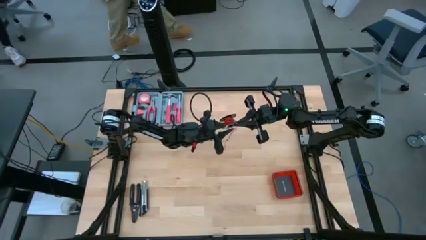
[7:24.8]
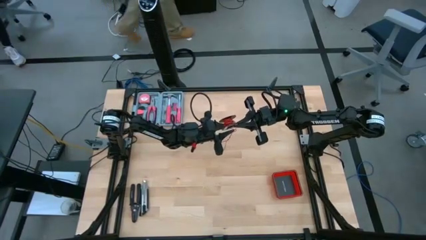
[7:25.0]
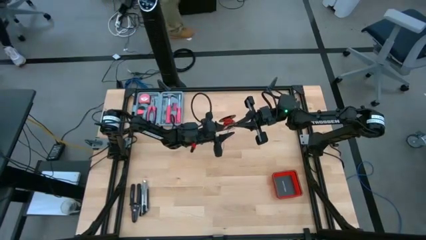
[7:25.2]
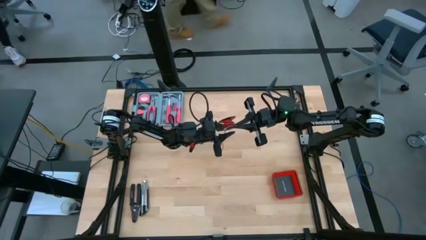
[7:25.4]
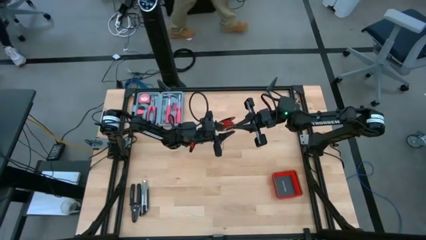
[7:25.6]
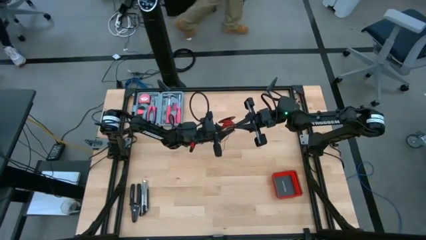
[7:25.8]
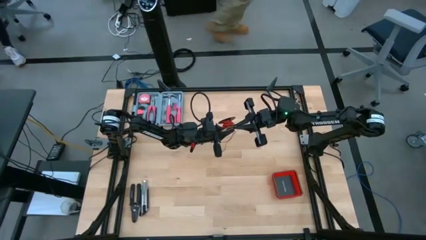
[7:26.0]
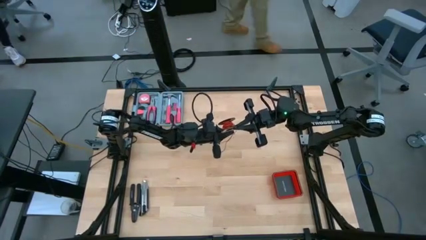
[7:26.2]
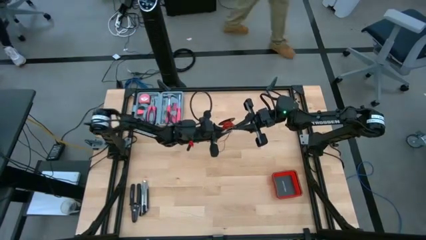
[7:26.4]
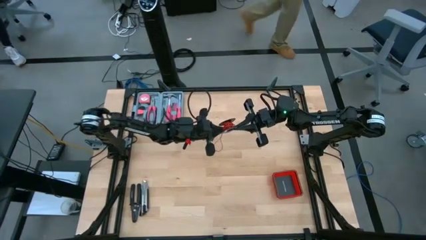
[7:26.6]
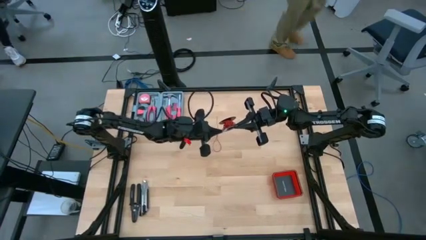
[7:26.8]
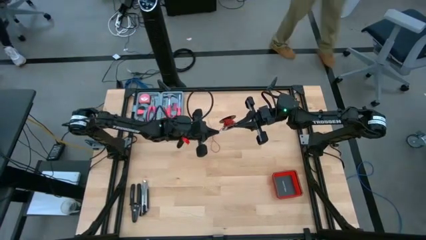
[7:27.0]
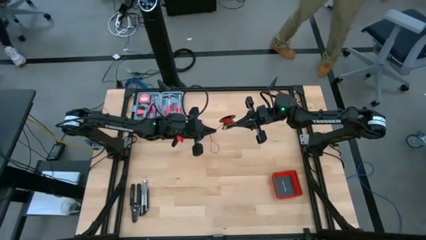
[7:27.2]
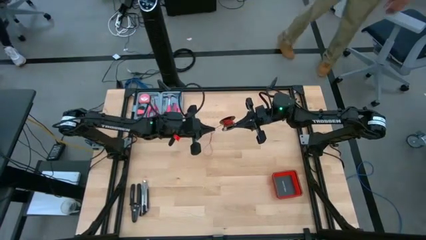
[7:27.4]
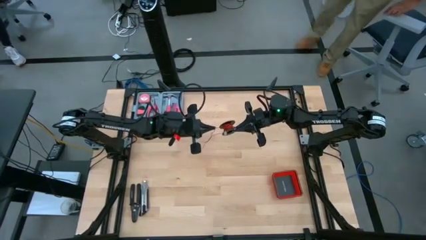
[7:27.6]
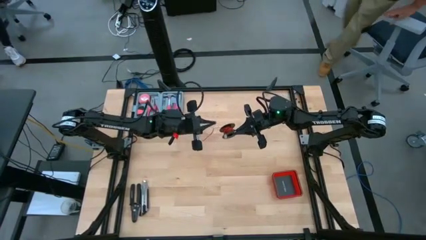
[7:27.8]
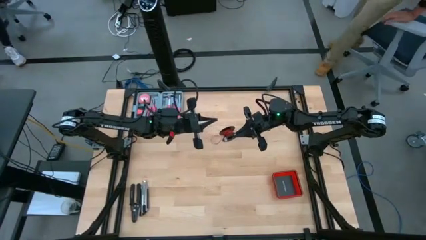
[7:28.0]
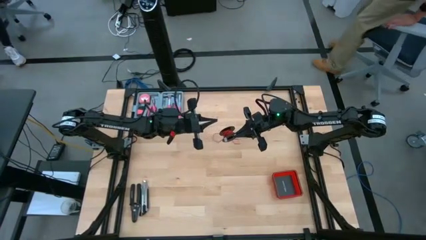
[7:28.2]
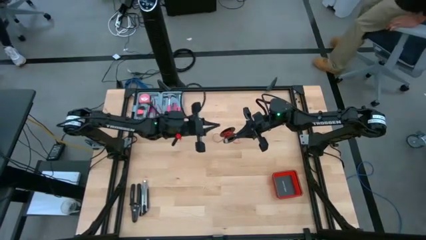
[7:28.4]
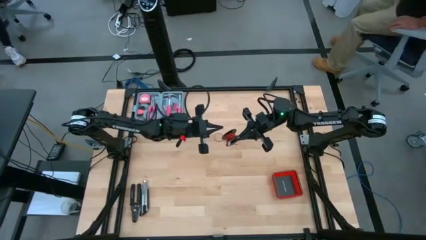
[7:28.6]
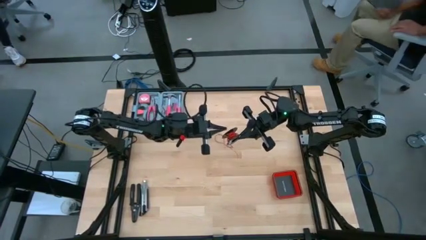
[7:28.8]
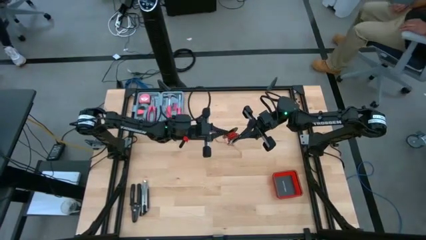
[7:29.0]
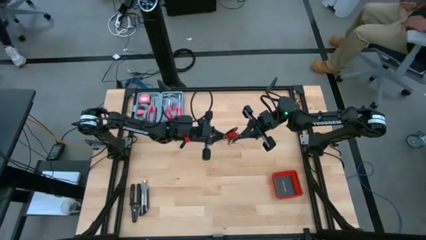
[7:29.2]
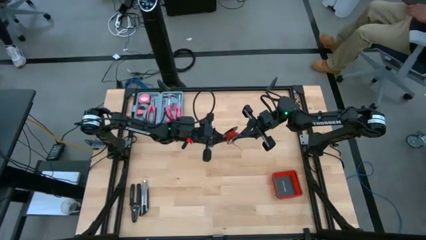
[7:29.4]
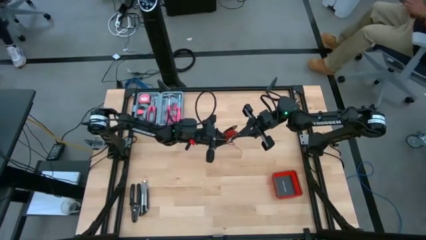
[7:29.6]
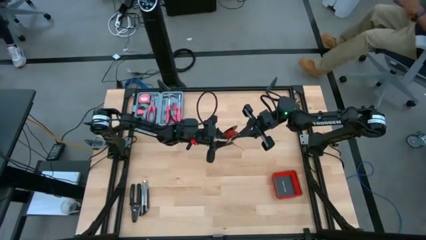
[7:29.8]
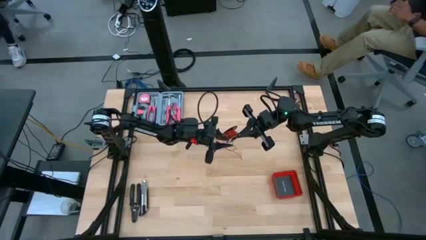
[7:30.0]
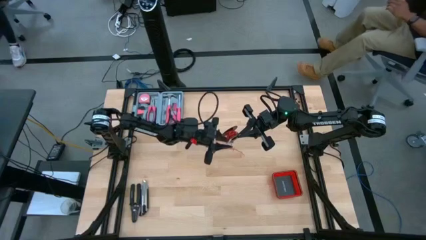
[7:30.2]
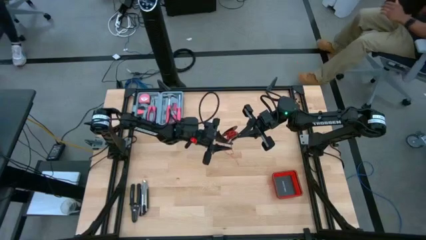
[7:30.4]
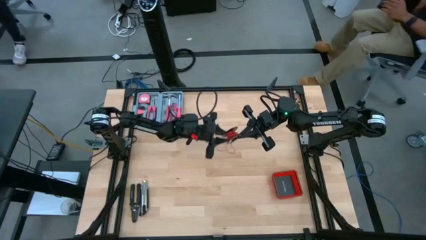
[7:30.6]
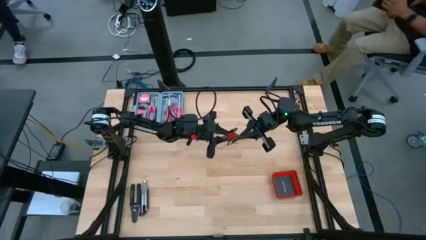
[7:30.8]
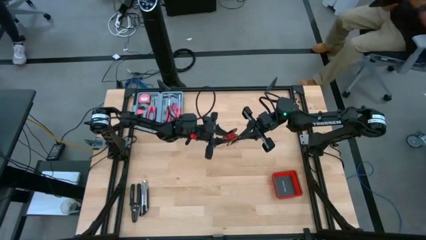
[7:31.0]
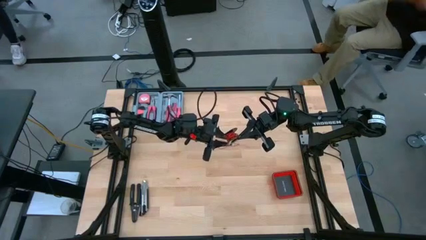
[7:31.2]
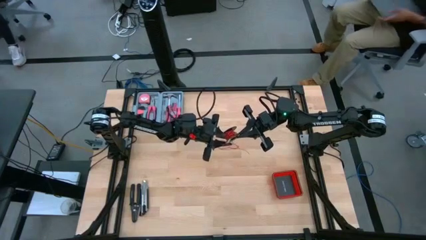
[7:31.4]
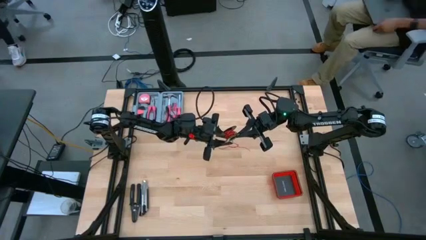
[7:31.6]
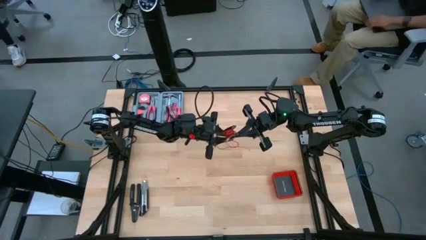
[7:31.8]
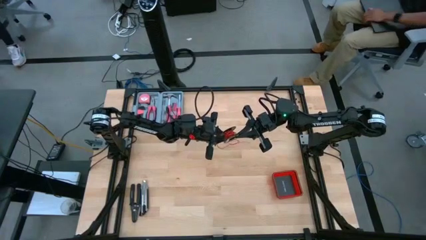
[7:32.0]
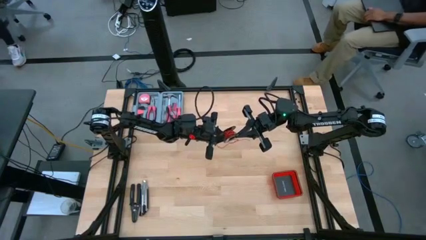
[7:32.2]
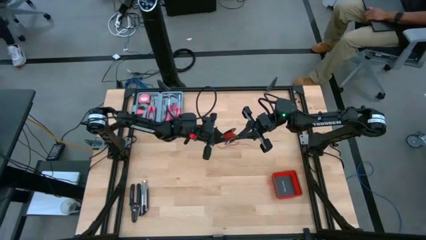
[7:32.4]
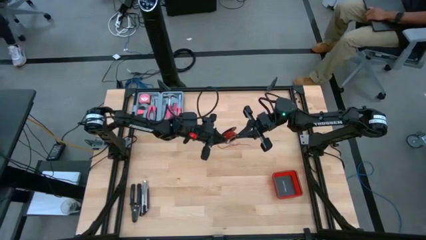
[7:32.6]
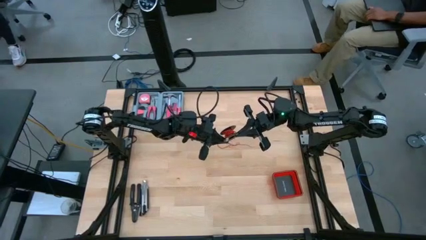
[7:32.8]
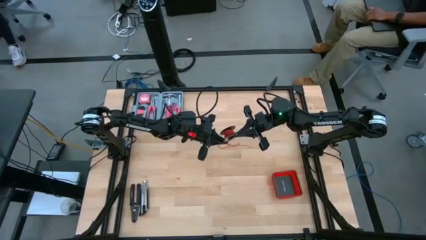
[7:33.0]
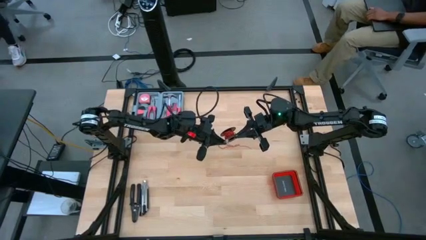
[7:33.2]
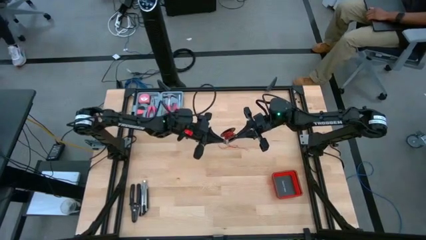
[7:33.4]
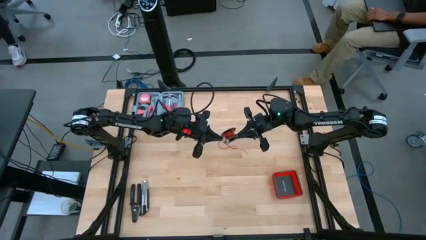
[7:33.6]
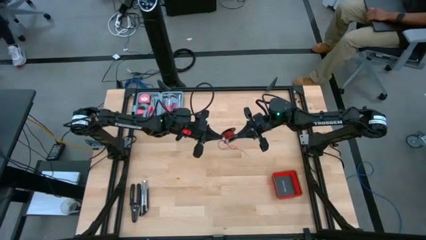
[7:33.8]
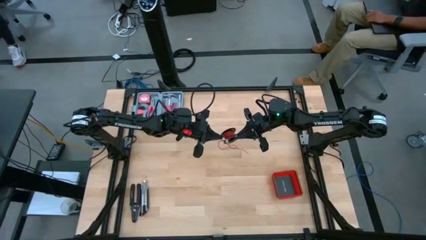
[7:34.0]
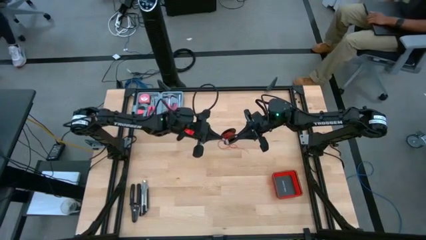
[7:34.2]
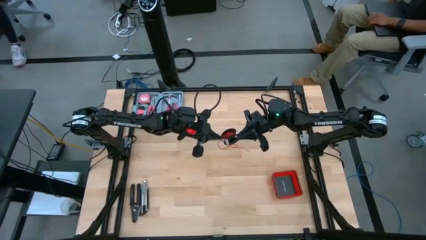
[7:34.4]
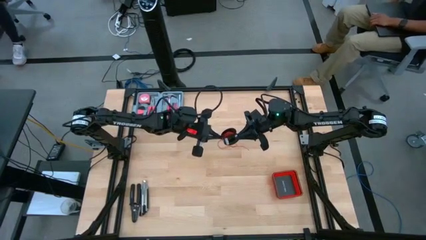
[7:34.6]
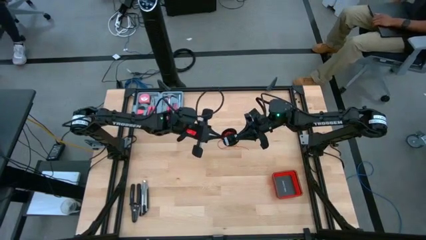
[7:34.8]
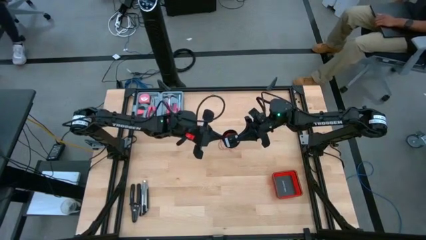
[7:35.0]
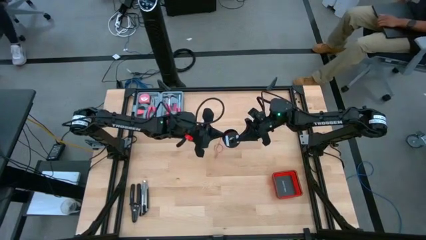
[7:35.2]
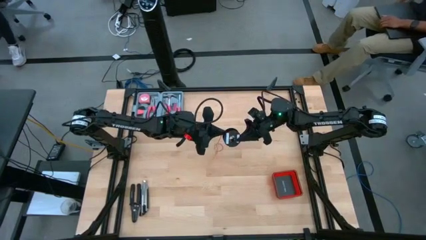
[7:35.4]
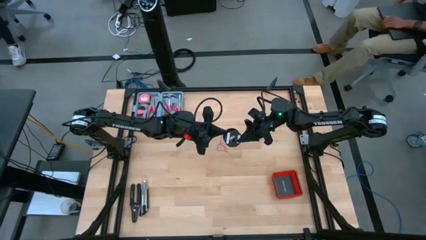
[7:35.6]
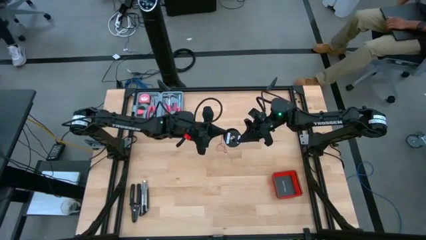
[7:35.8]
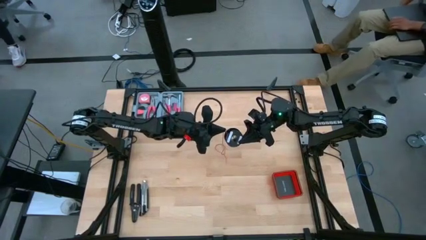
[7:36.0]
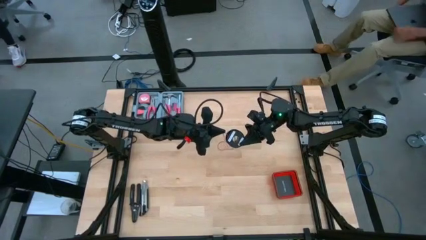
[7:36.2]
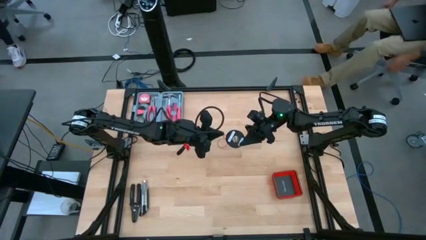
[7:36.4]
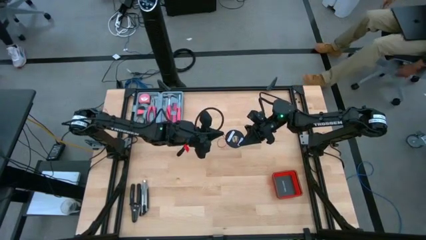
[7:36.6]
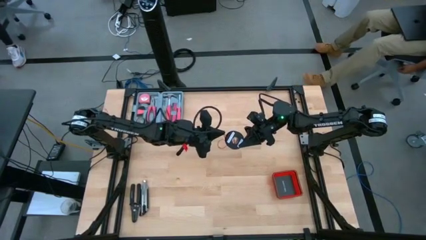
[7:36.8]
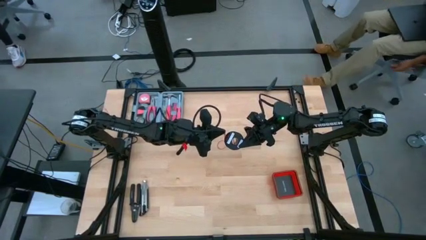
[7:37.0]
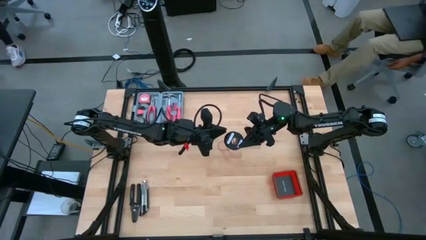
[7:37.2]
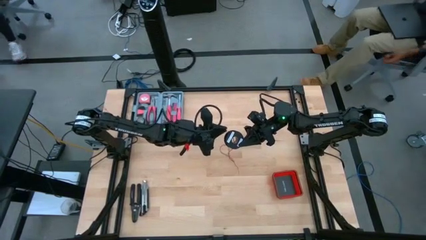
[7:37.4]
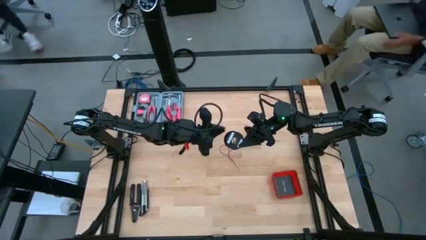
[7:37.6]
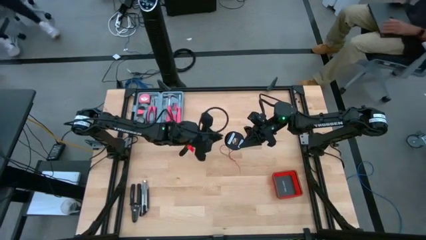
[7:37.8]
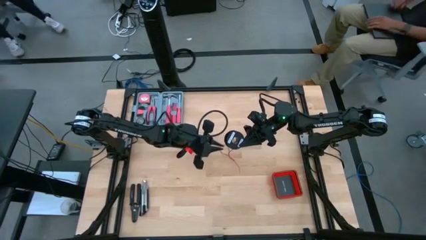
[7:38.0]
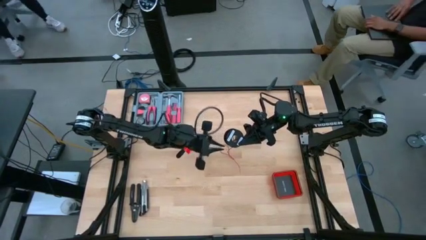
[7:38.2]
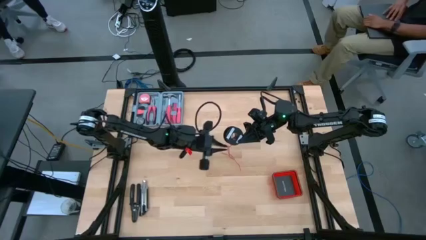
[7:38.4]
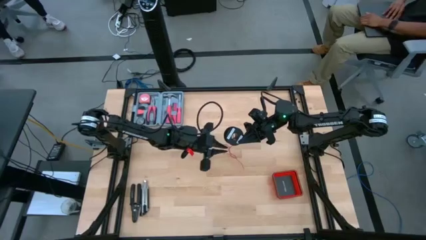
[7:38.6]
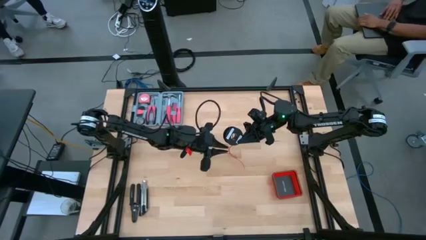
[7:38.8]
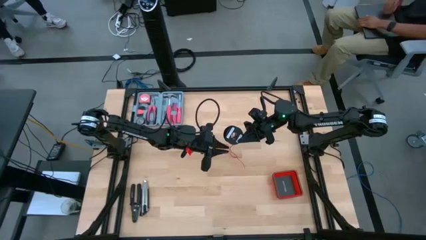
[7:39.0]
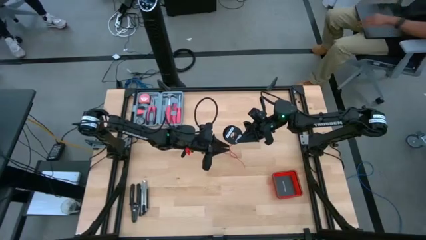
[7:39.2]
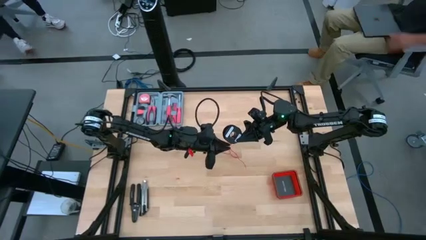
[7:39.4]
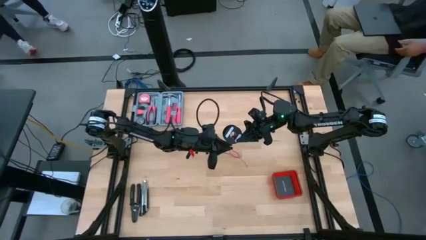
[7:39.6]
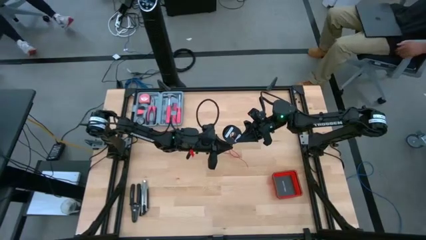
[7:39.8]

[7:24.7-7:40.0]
Task: Coil cords
Coil the red wire onto the spool
